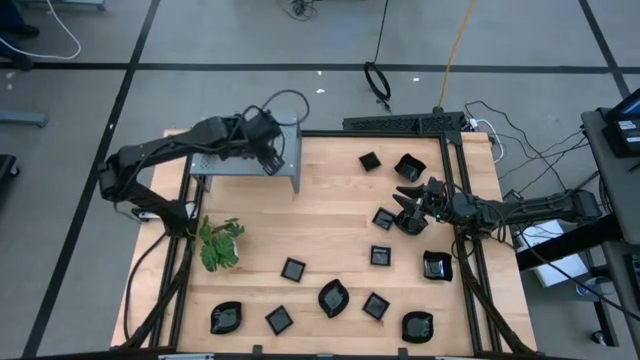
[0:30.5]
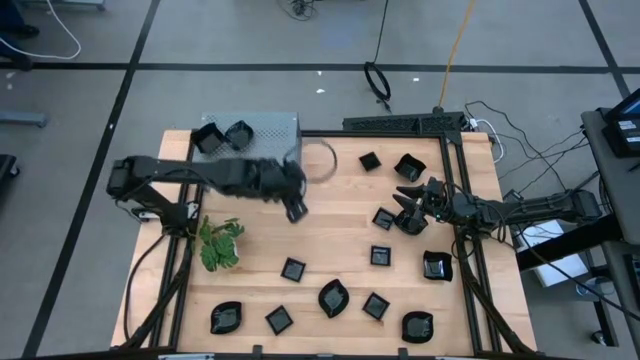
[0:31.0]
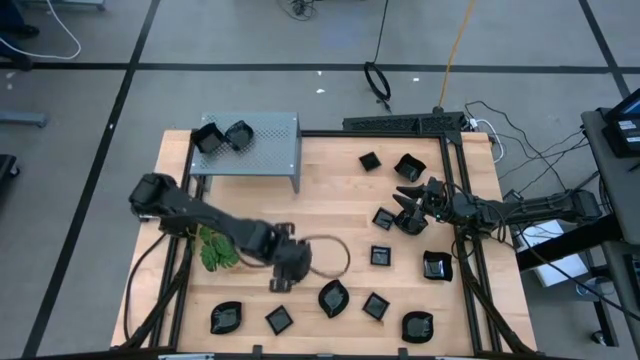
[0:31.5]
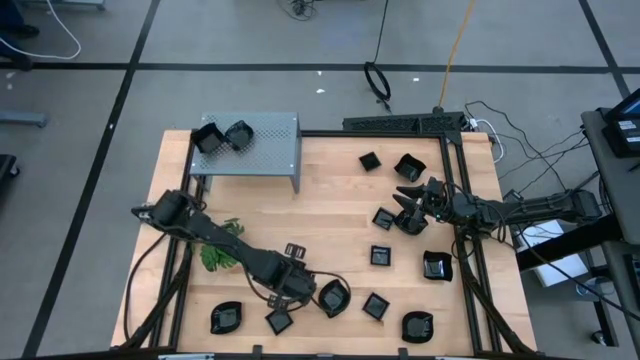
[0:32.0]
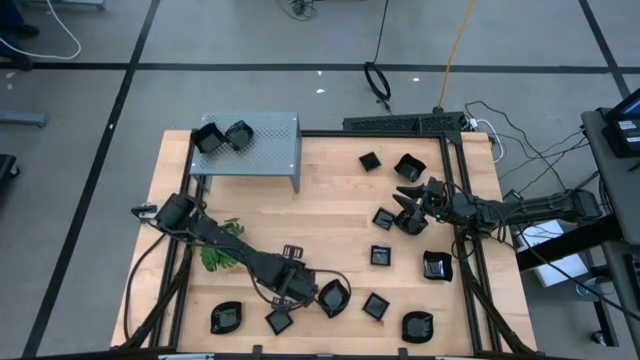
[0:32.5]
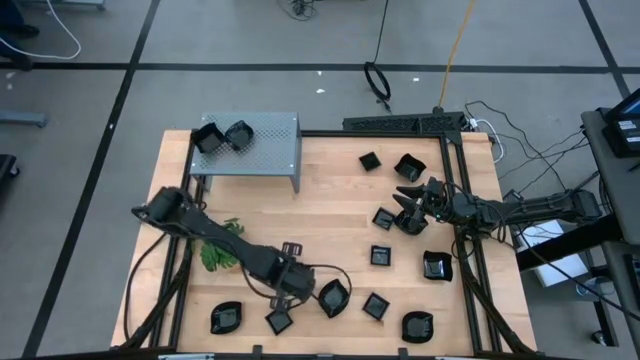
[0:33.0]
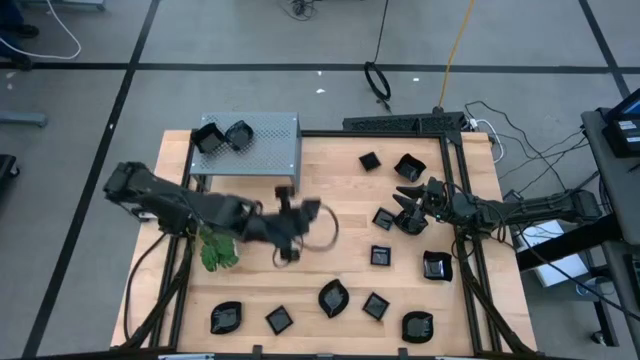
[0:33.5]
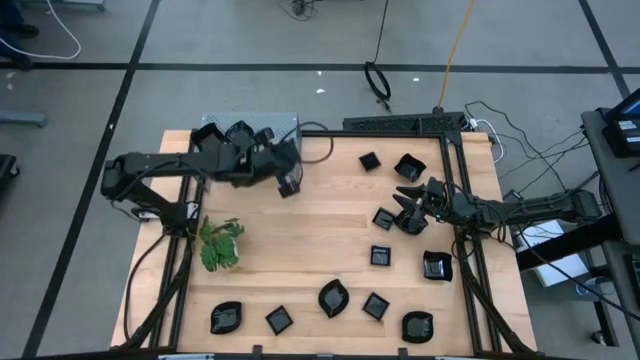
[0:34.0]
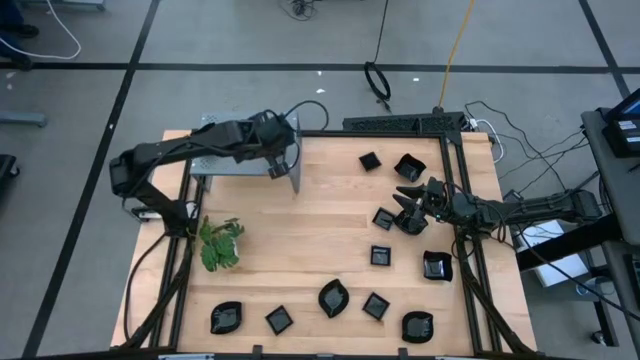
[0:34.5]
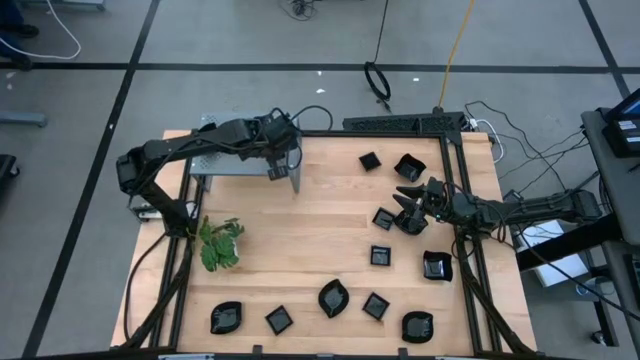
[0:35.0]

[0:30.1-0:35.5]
Task: Pick & Place Mini shaped plates
Put the square plate on the shelf

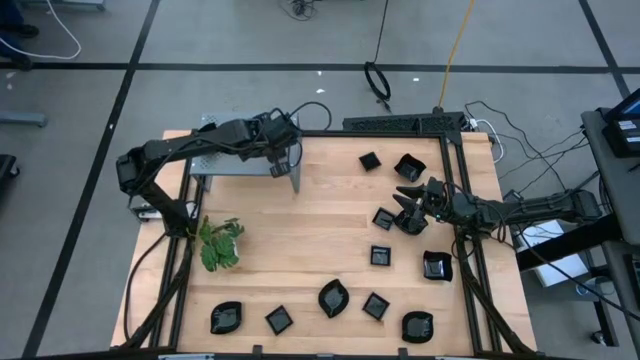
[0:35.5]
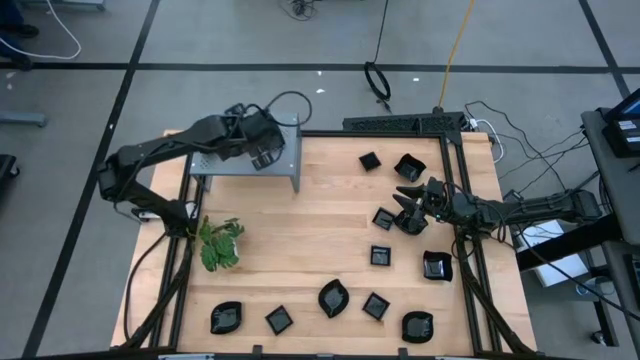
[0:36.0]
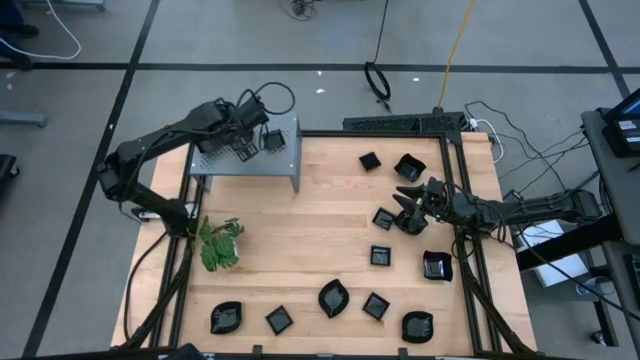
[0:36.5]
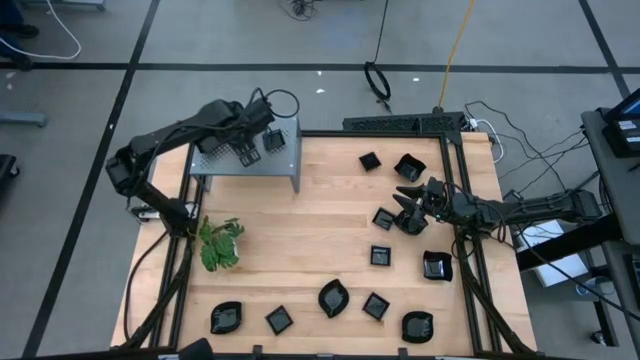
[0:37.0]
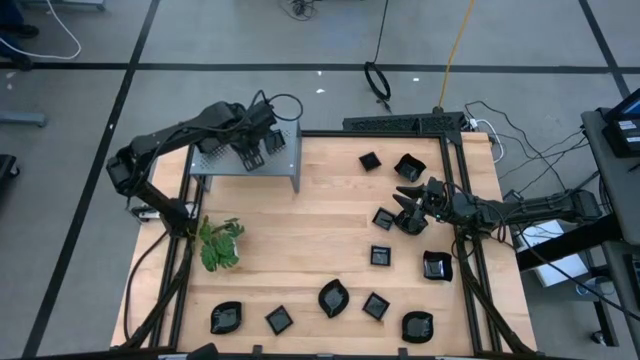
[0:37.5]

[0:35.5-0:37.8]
Adjust the leaf shaped plate on the shelf

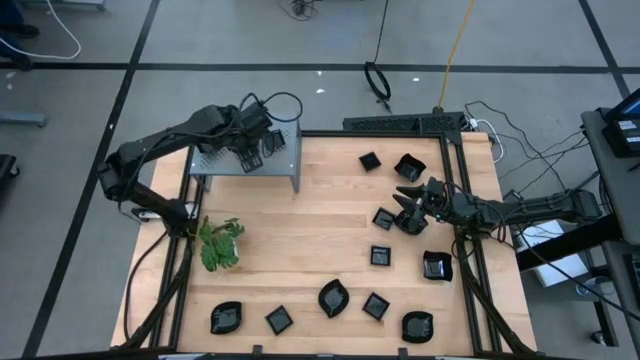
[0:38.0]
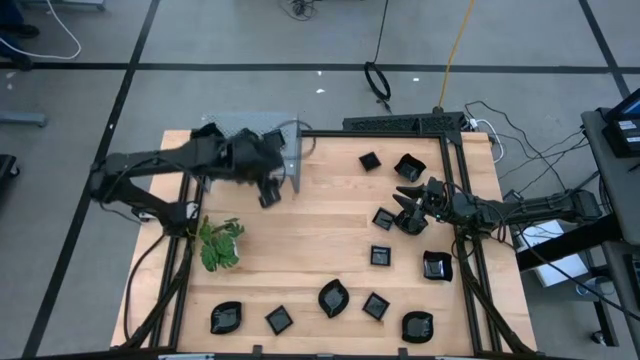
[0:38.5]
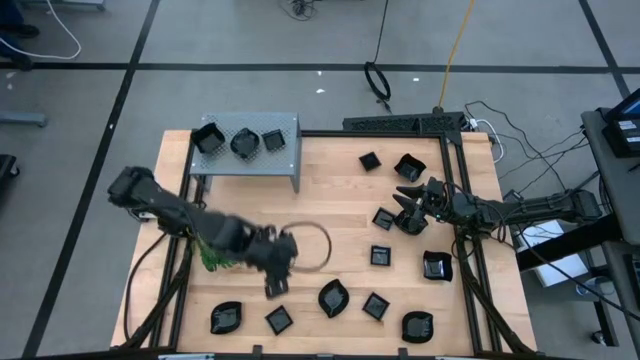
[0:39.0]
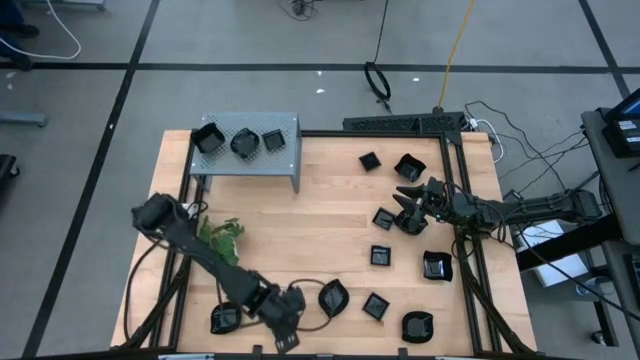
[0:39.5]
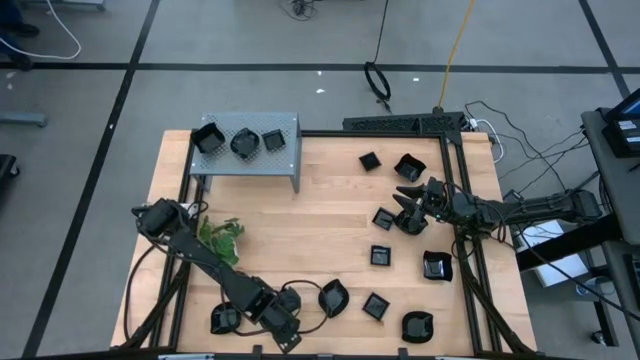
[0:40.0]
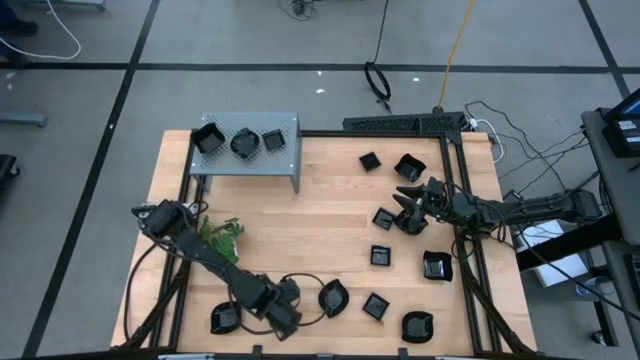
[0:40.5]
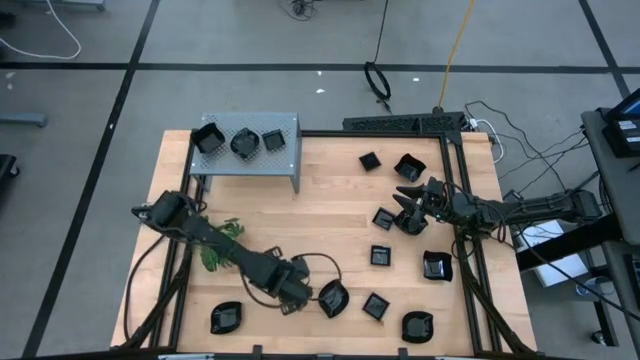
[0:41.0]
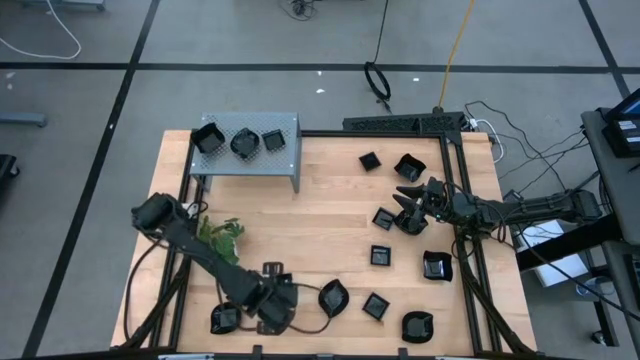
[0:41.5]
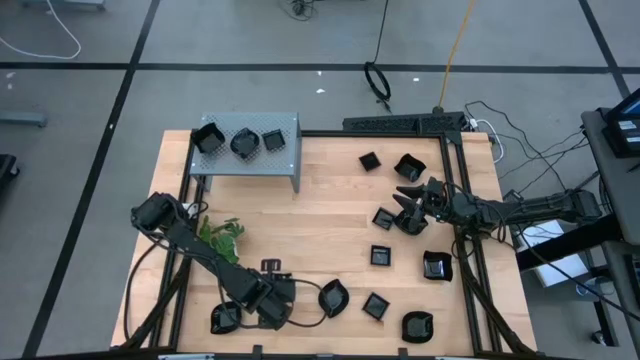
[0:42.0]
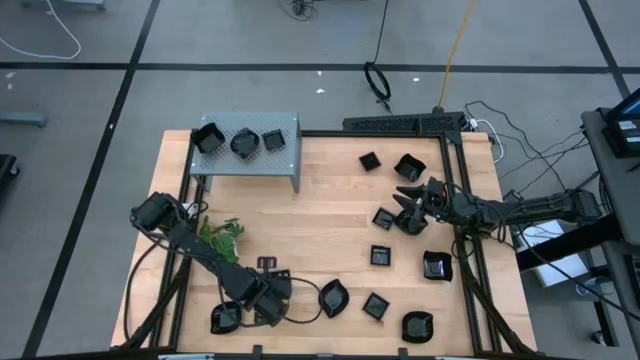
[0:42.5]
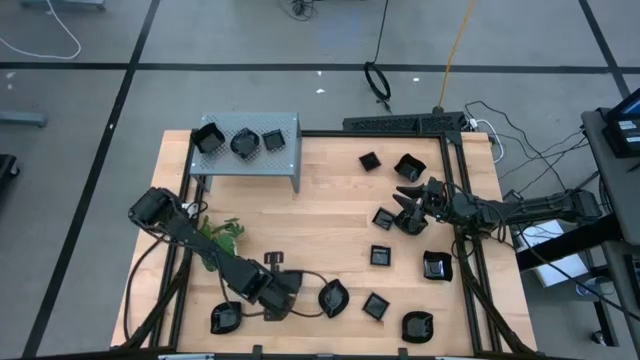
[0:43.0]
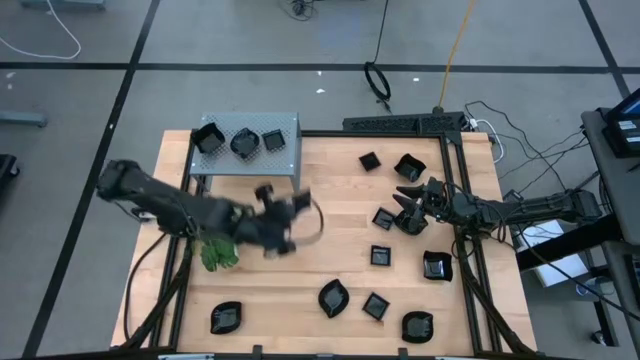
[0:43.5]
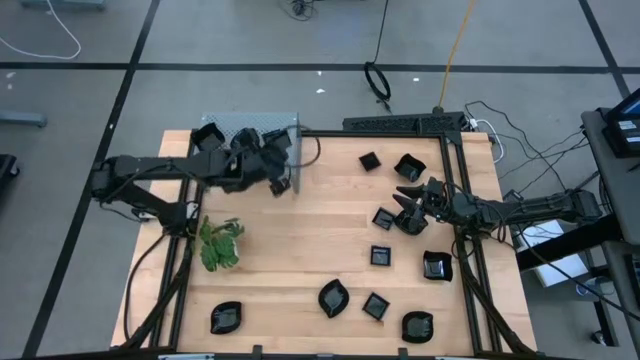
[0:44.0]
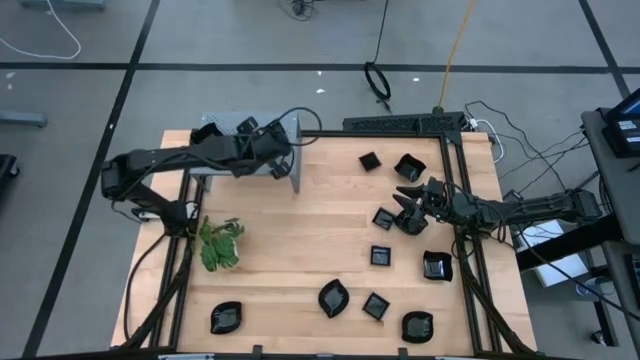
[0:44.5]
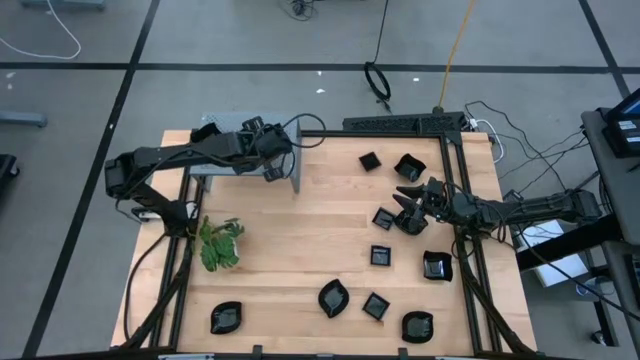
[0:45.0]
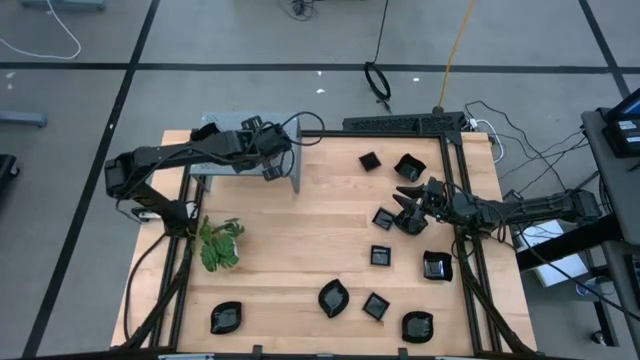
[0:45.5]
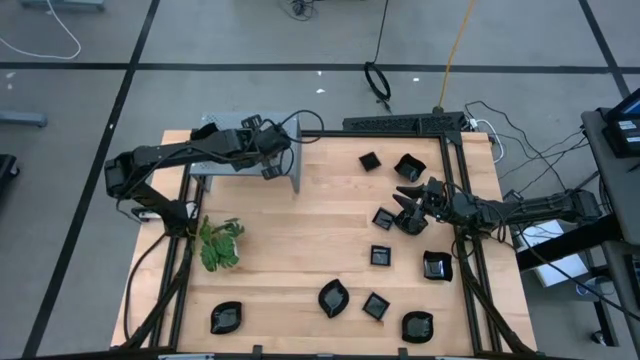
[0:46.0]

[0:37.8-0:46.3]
Stack the square plate on top of the square plate on the shelf

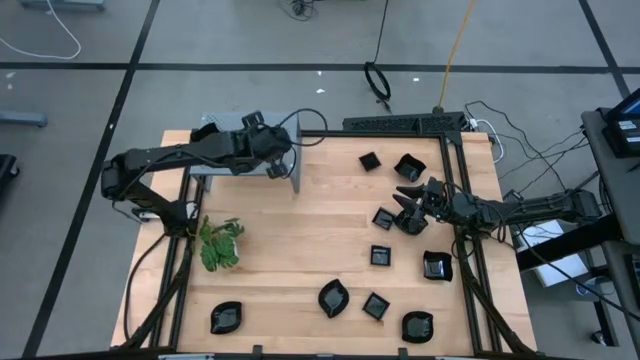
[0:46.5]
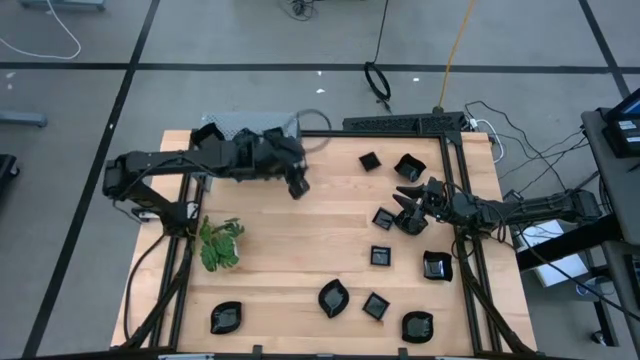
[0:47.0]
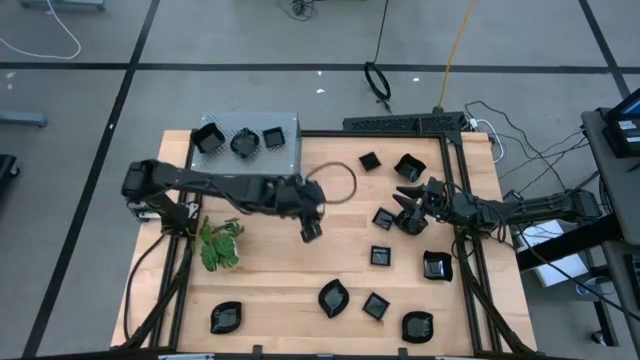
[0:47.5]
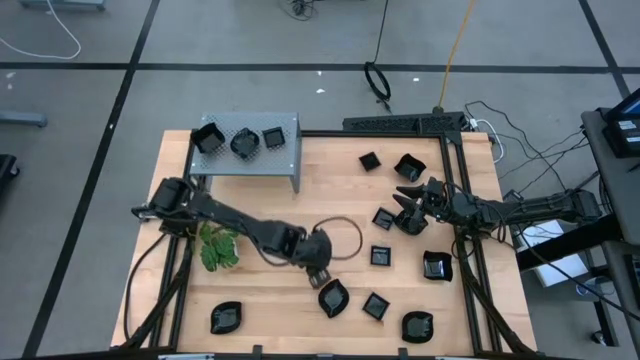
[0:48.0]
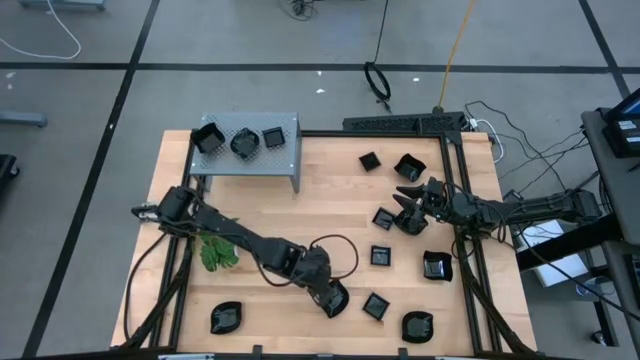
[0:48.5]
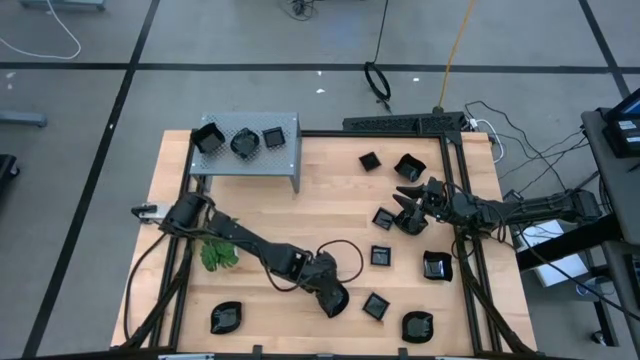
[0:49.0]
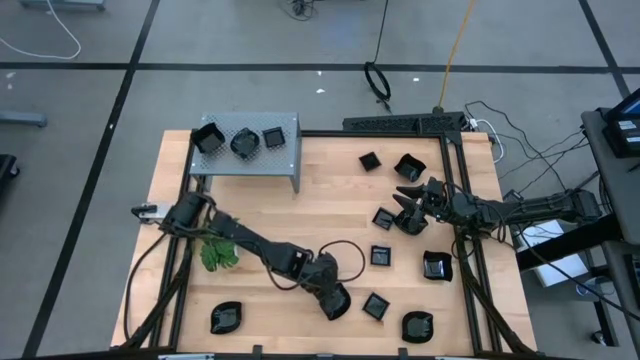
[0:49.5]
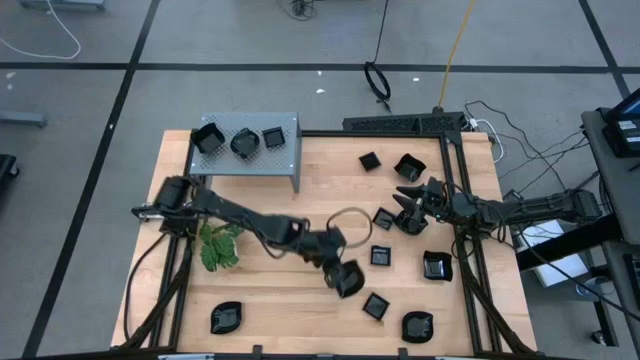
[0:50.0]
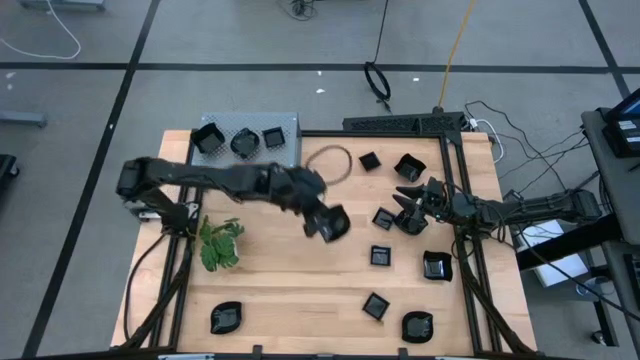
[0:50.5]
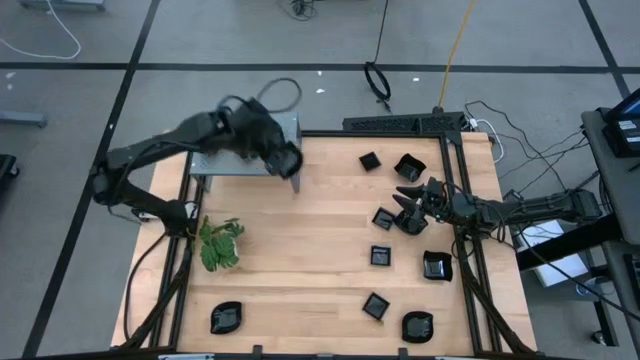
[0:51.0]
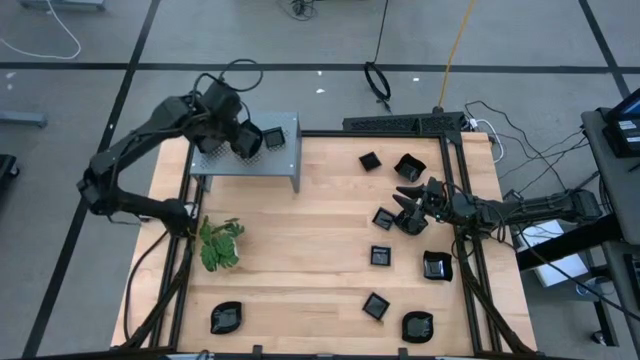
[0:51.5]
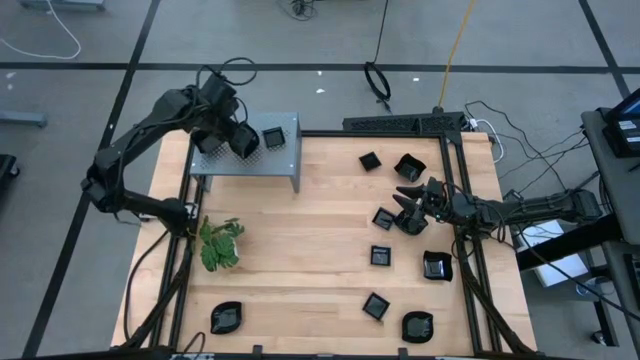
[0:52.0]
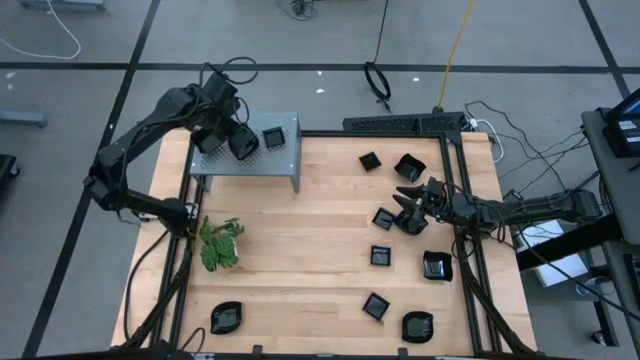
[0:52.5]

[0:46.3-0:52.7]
Stack the leaf shaped plate on top of the leaf plate on the shelf
